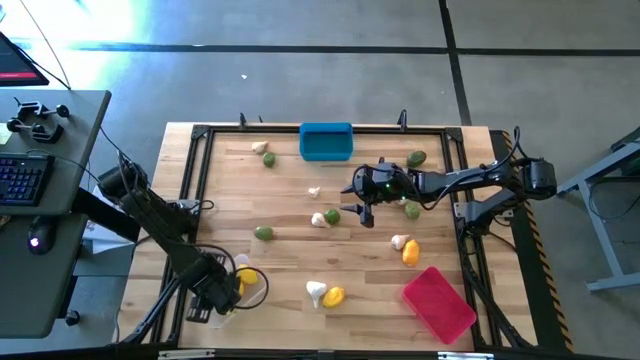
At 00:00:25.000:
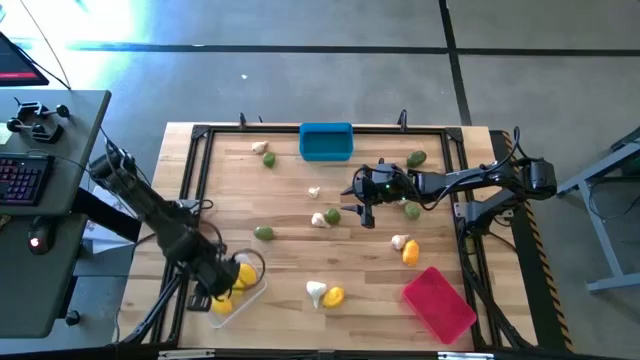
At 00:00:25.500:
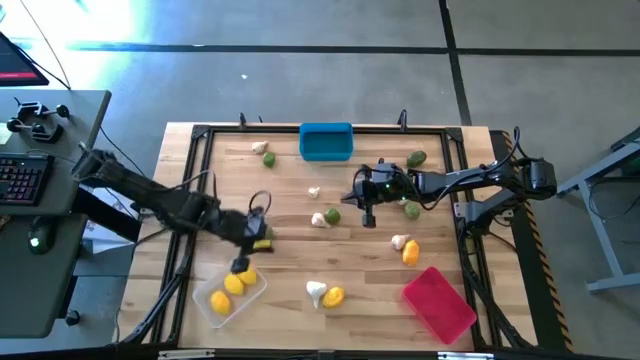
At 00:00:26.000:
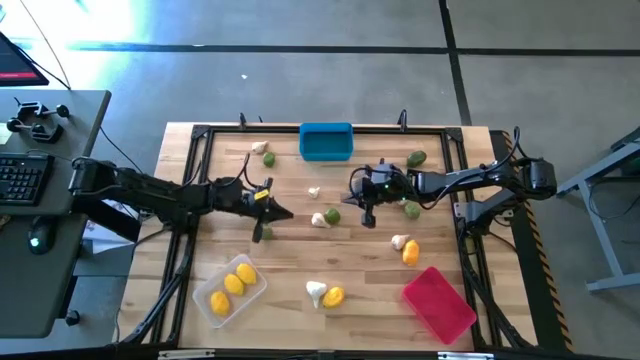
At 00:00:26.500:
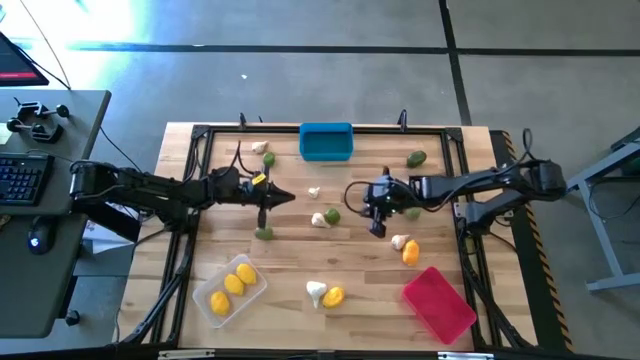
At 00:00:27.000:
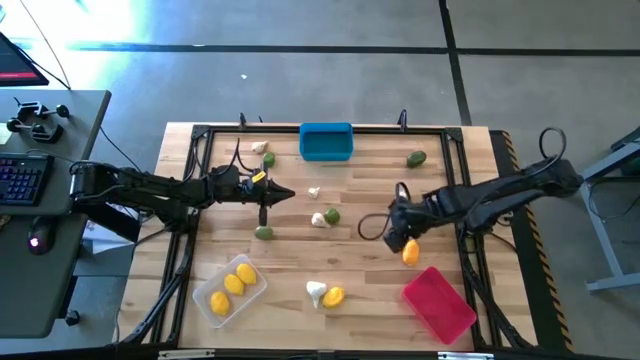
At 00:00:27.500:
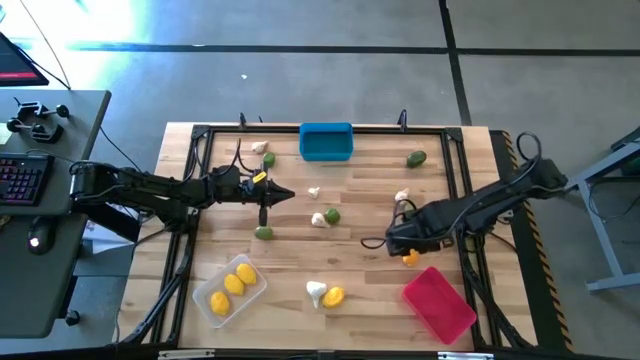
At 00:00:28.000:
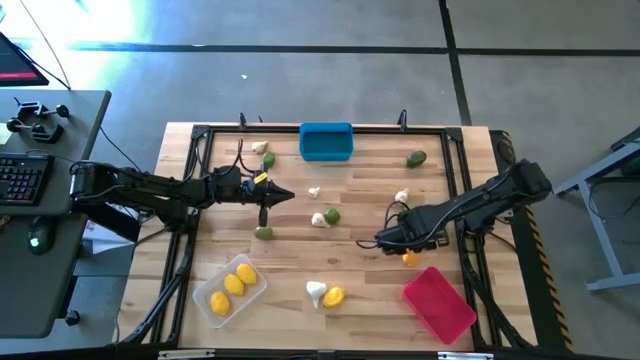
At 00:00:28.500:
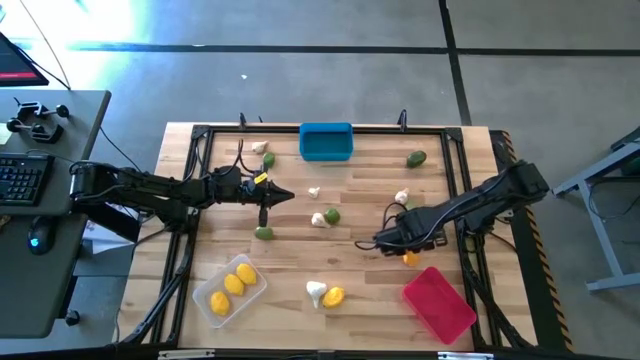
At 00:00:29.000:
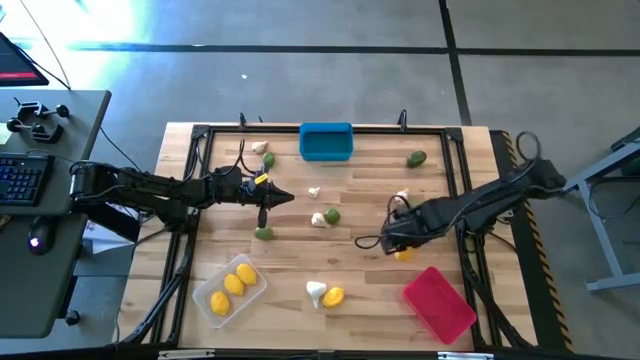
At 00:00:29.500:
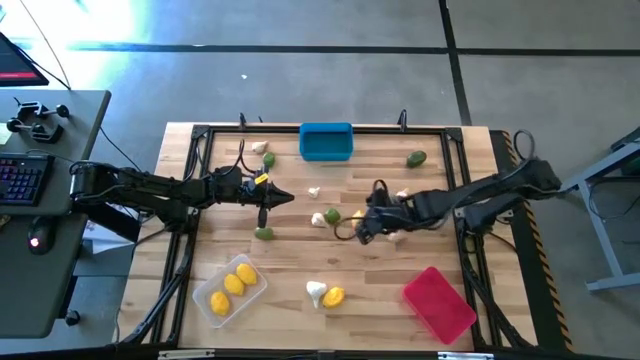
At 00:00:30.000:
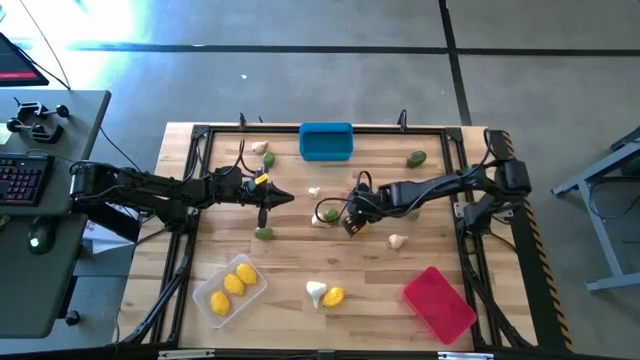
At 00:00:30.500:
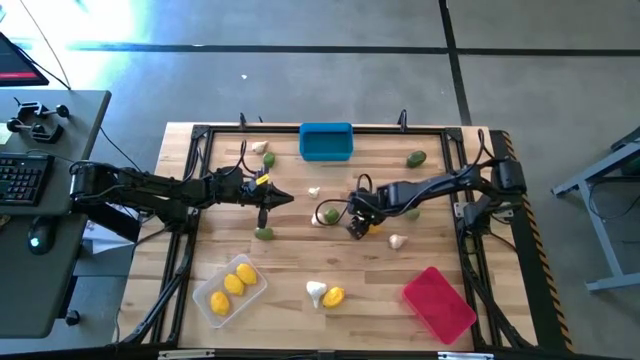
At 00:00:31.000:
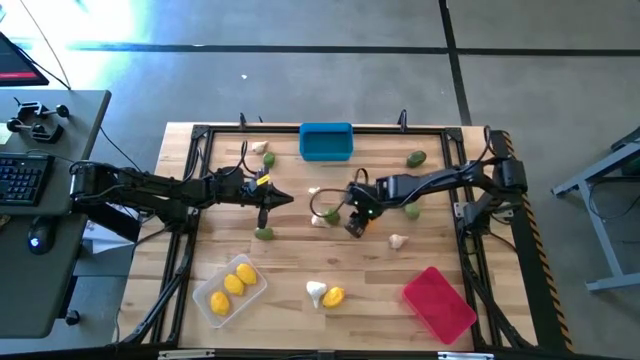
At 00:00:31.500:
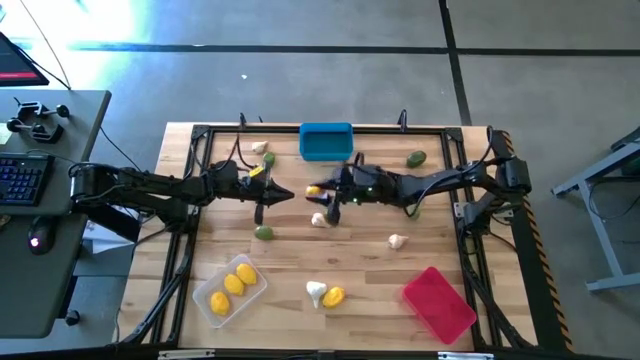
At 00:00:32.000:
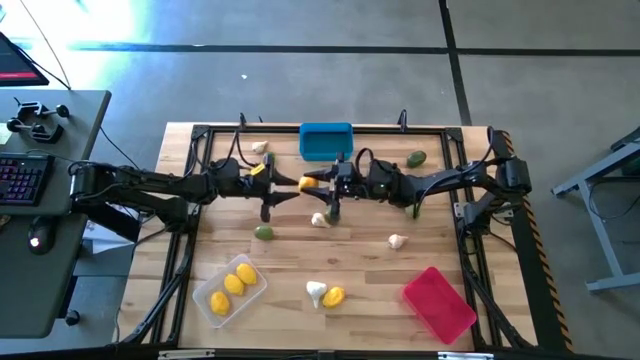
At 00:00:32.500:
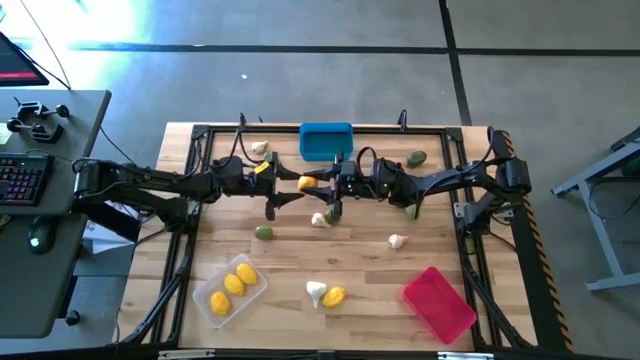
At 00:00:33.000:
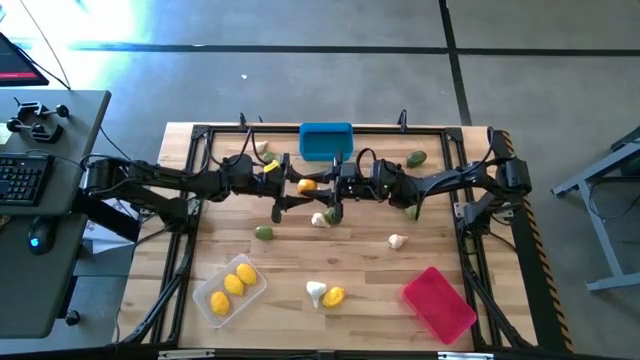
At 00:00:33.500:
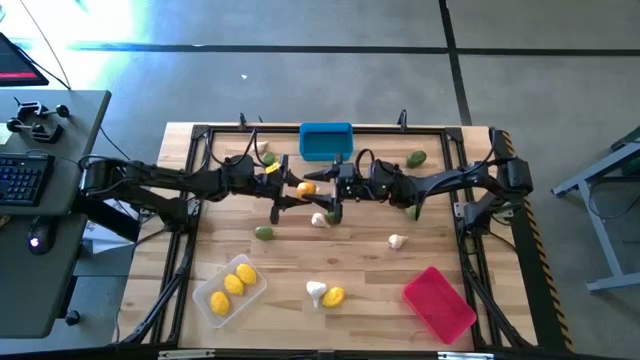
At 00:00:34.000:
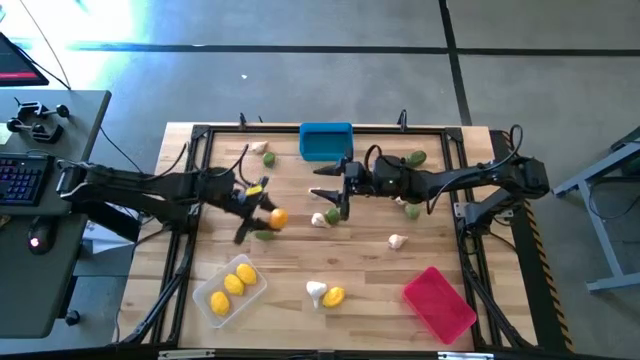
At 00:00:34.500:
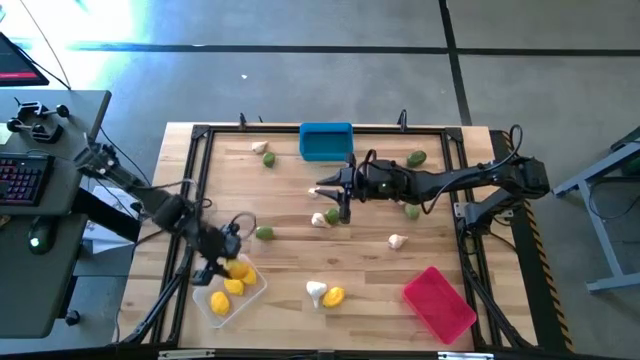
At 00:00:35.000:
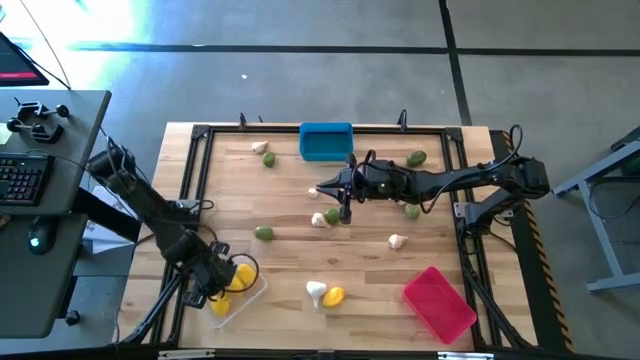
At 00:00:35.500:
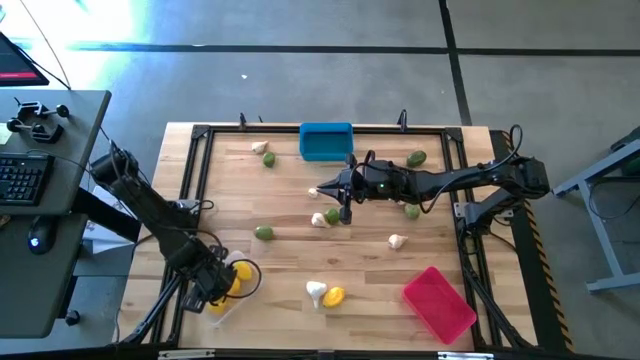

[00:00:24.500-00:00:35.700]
Task: Sort produce into baskets
Put the lemon into the transparent bin

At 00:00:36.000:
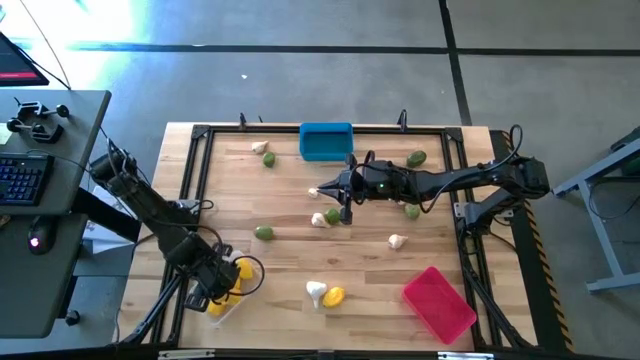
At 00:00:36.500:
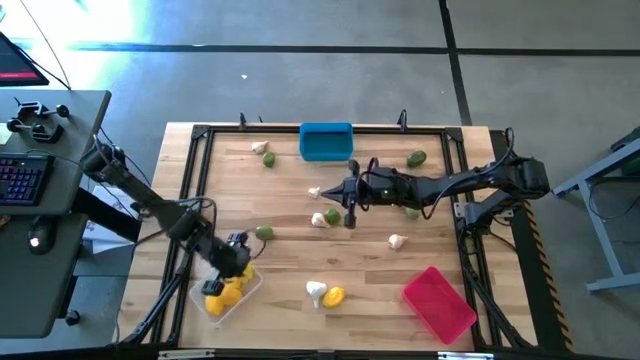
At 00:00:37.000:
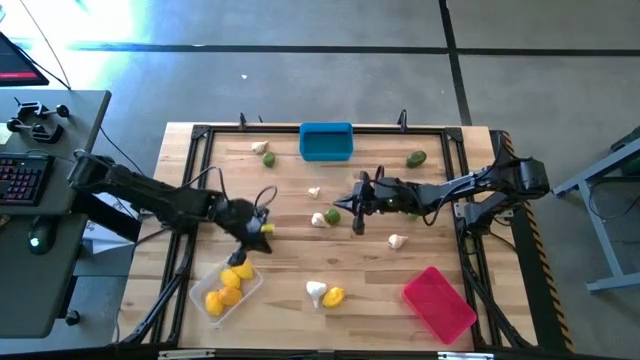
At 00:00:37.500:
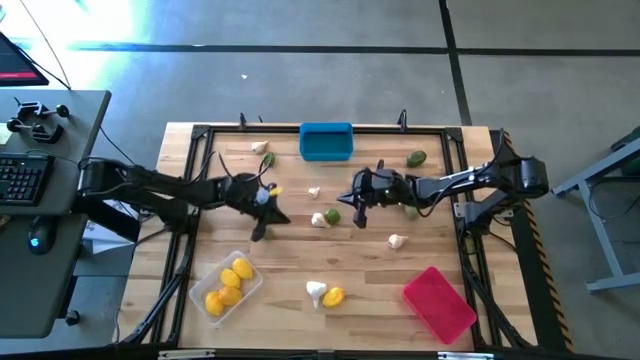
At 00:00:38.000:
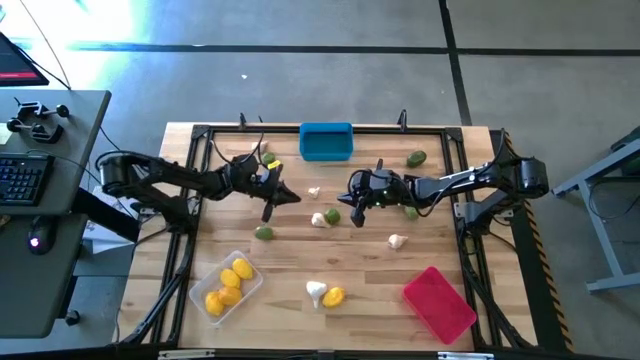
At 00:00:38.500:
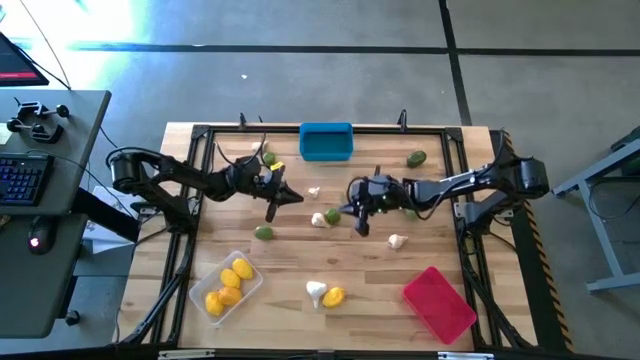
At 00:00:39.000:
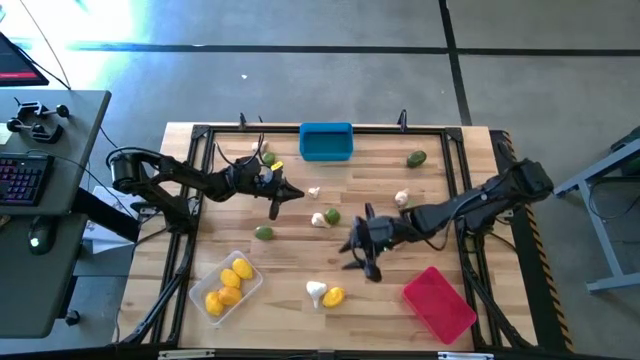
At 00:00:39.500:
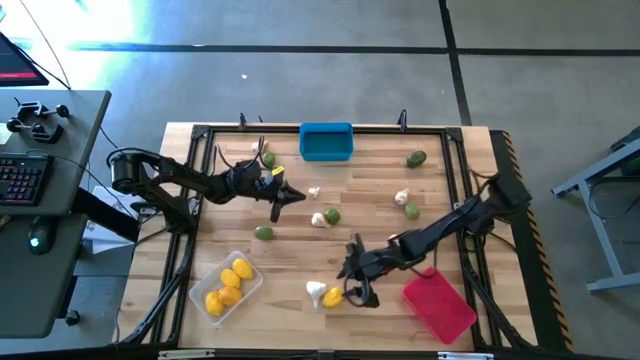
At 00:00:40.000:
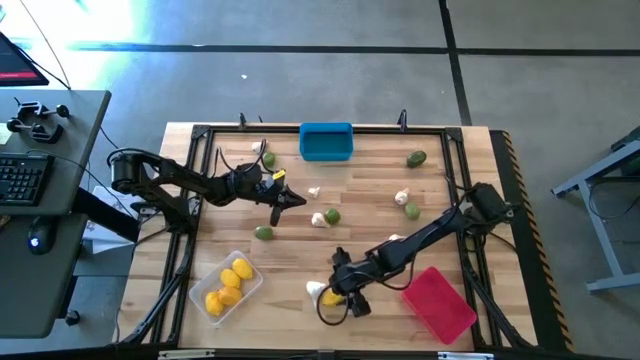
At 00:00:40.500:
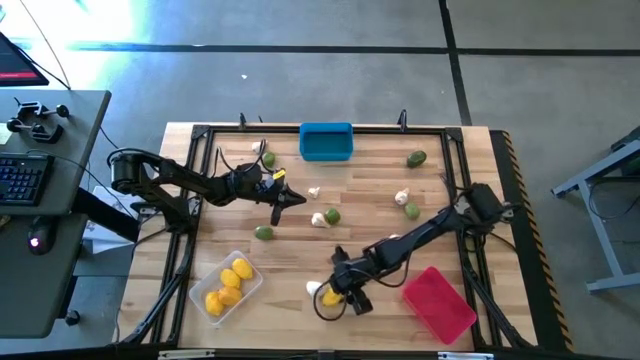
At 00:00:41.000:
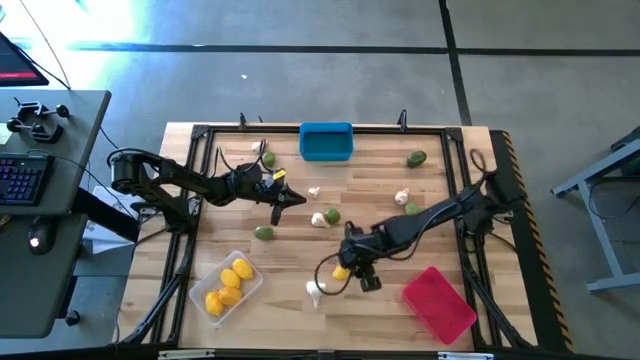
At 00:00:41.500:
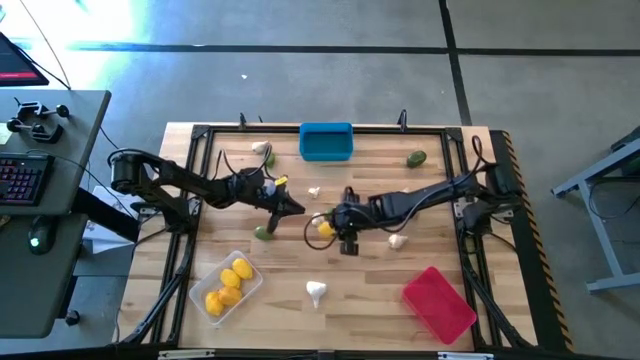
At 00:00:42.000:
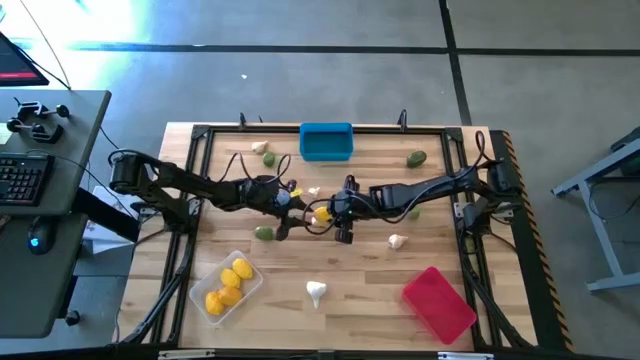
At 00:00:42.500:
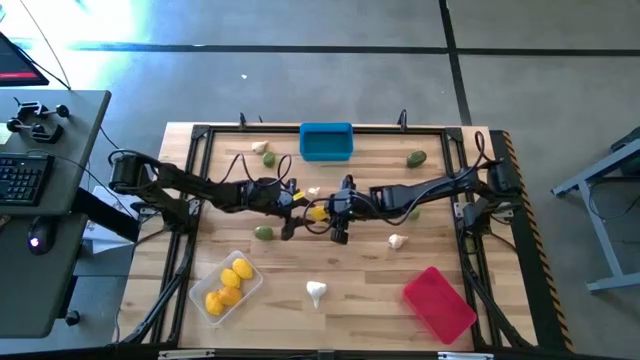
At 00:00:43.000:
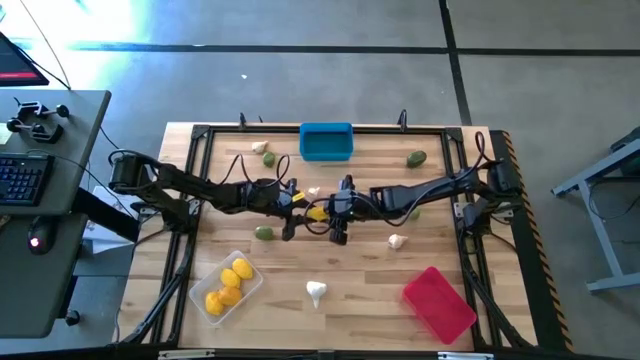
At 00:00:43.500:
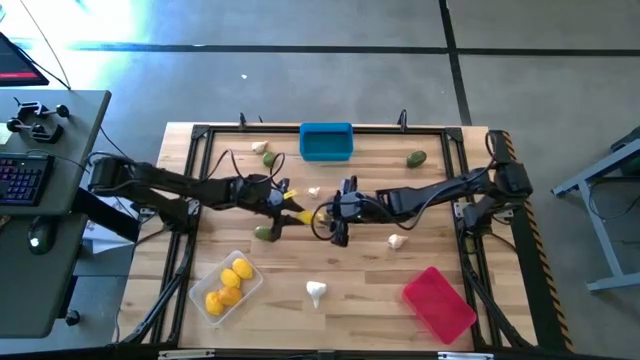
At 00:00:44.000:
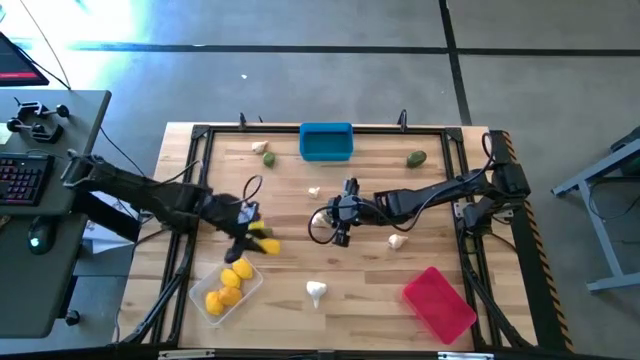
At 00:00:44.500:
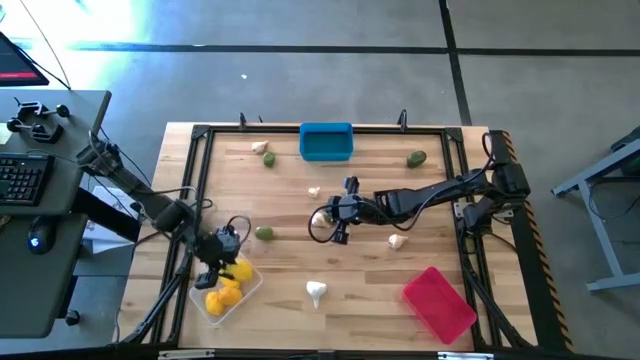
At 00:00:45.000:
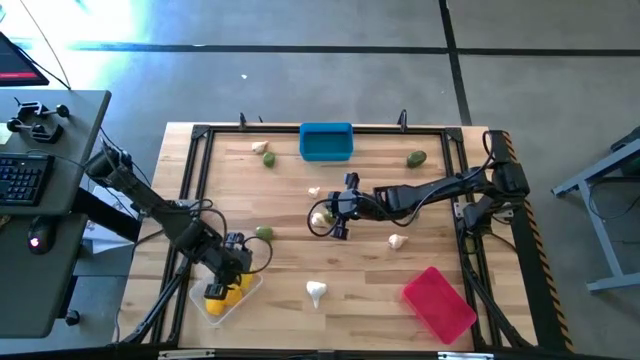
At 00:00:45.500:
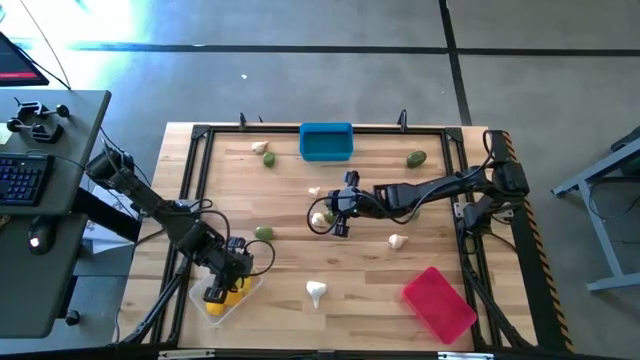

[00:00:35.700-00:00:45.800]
Put the lemon into the transparent bin
